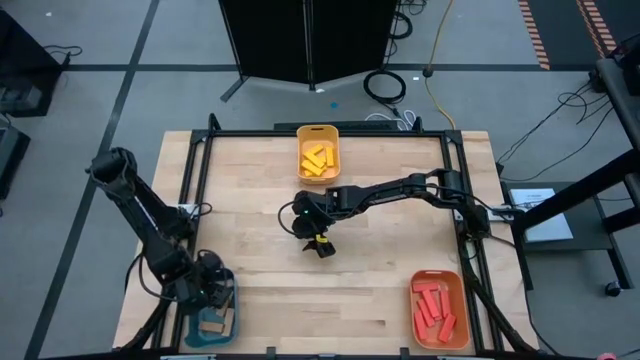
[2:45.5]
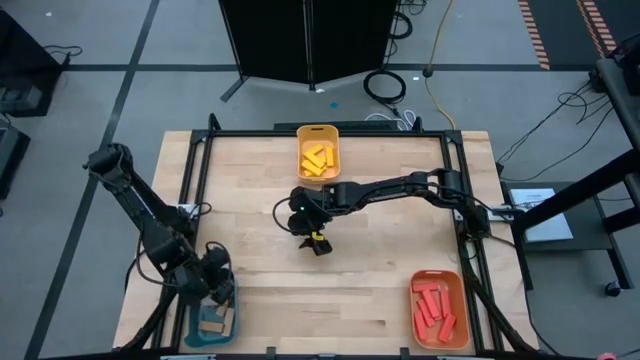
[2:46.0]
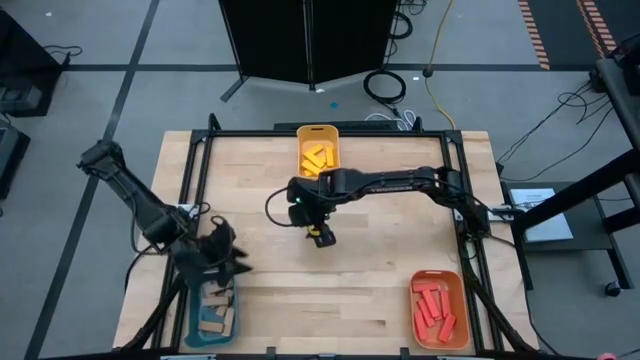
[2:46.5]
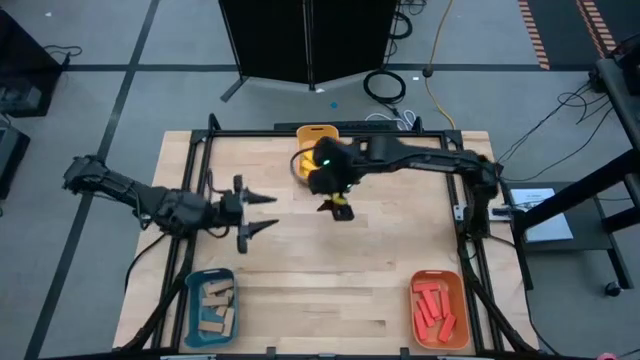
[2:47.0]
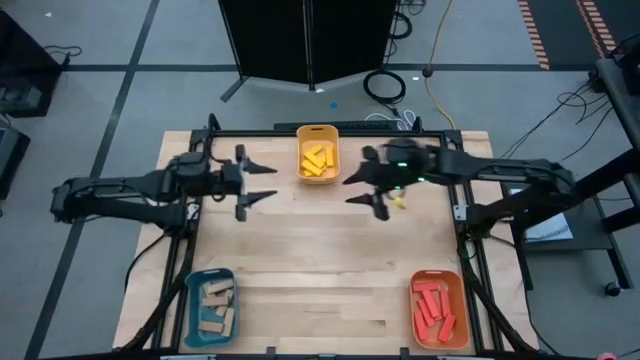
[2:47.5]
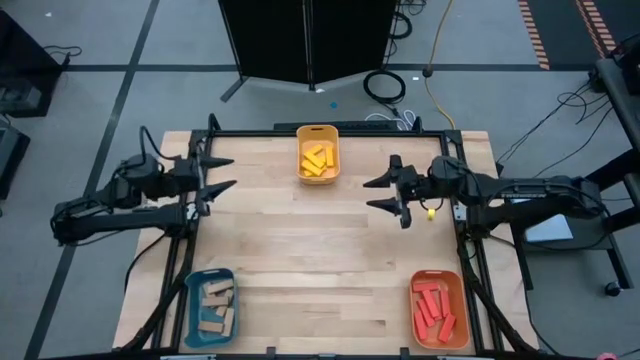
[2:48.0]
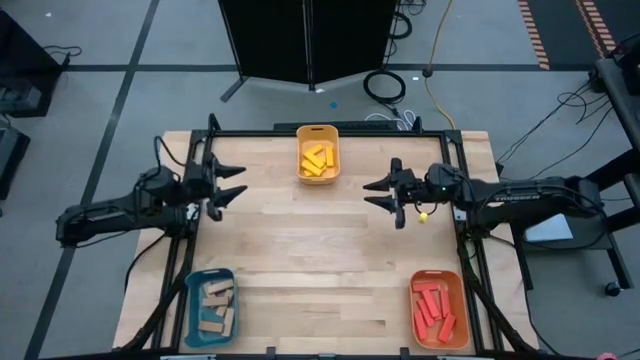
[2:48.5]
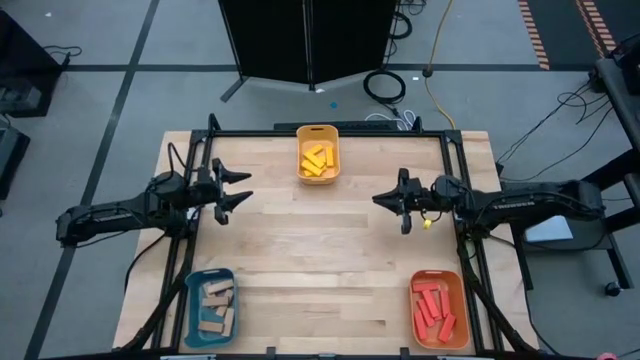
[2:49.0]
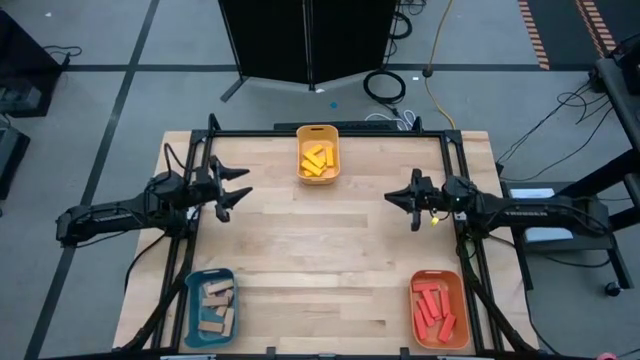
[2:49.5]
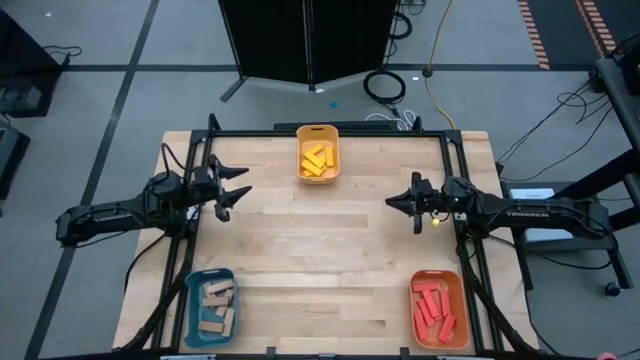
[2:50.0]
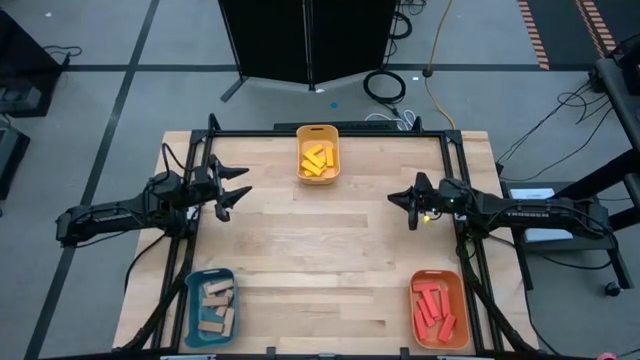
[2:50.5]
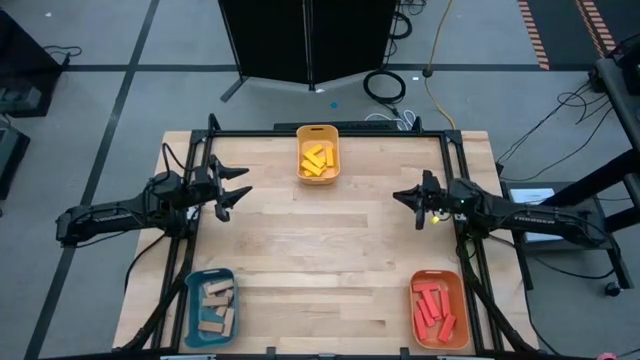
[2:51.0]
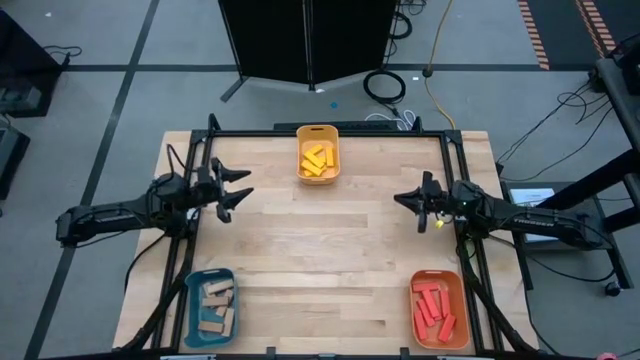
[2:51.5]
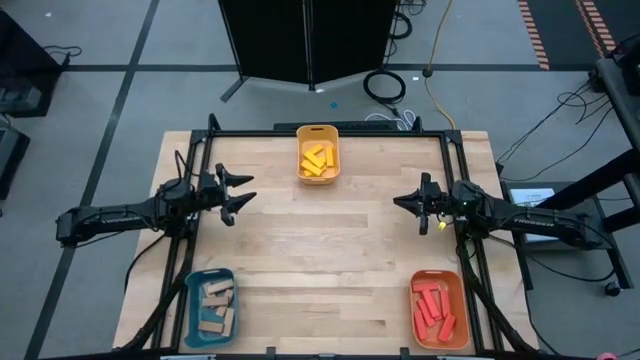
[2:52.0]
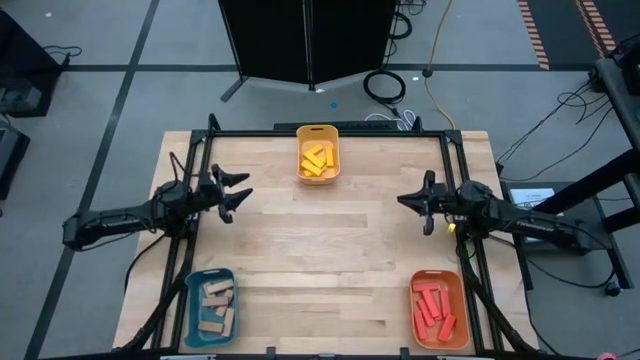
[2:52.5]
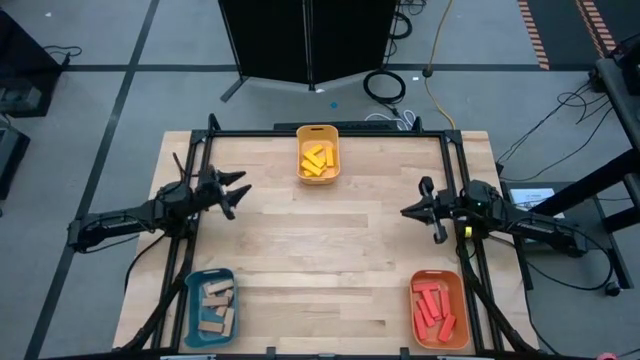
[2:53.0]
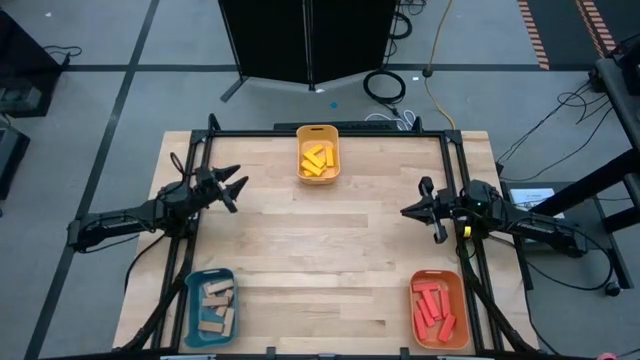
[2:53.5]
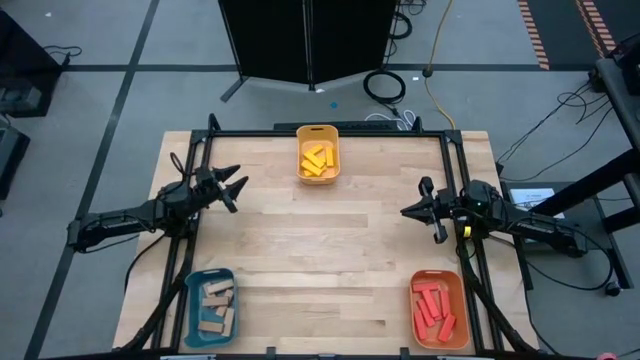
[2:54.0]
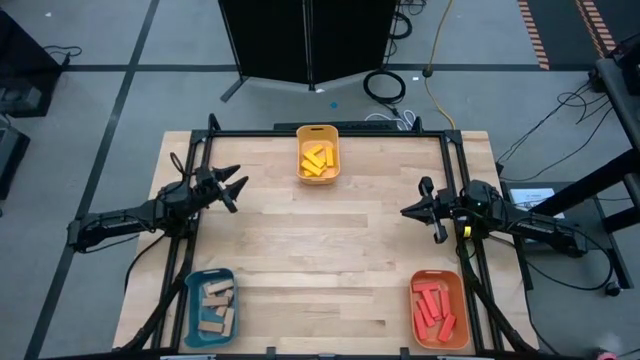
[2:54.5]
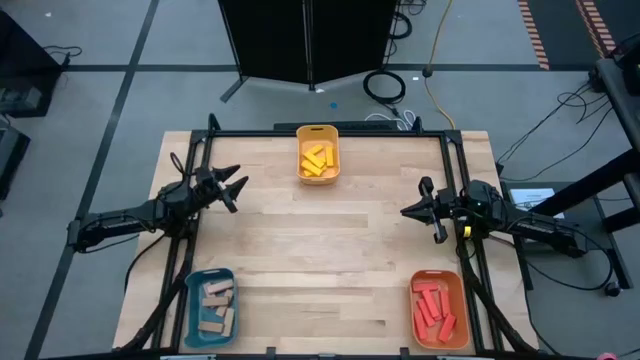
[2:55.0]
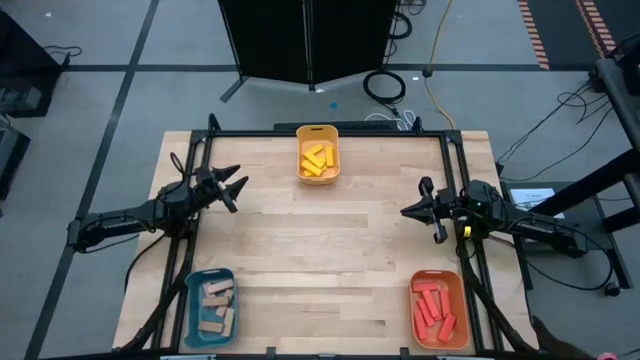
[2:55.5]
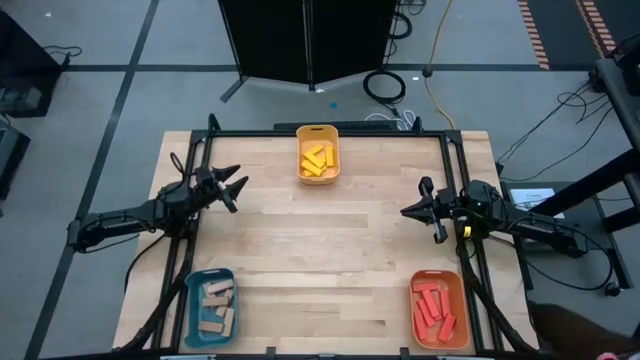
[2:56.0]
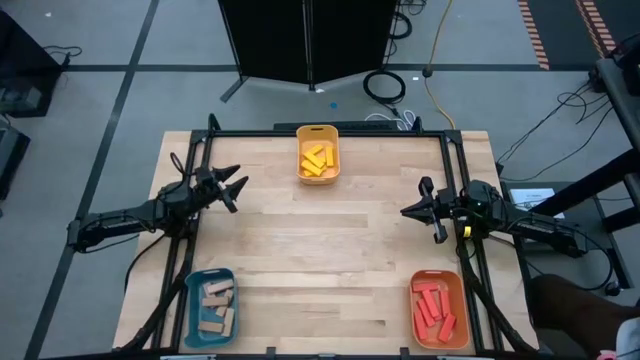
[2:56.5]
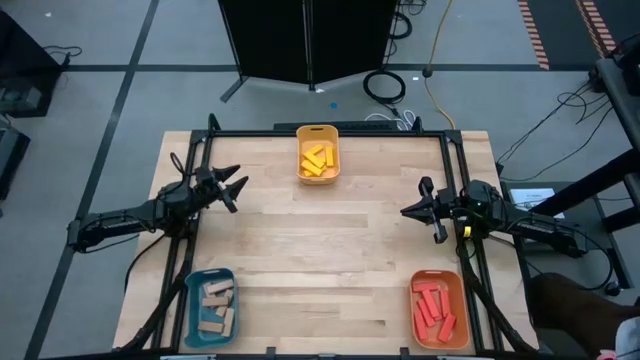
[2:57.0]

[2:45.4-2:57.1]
Task: Sort blocks
Return to Home Position

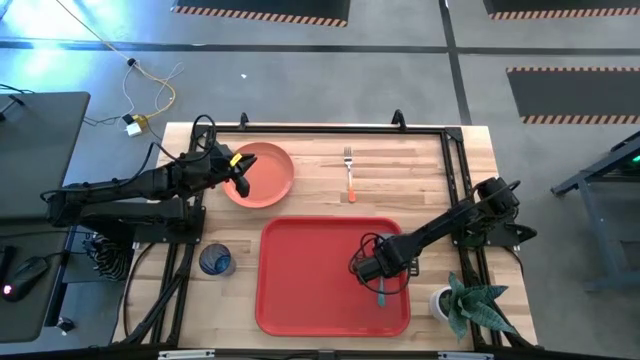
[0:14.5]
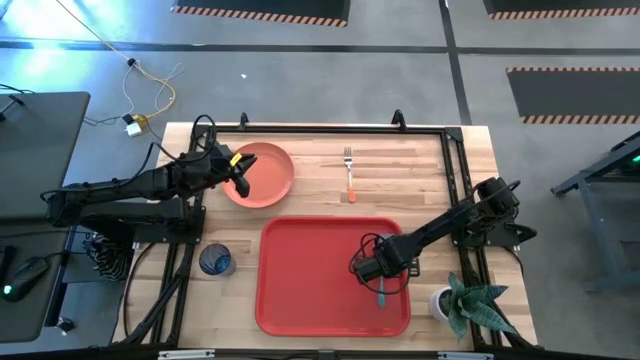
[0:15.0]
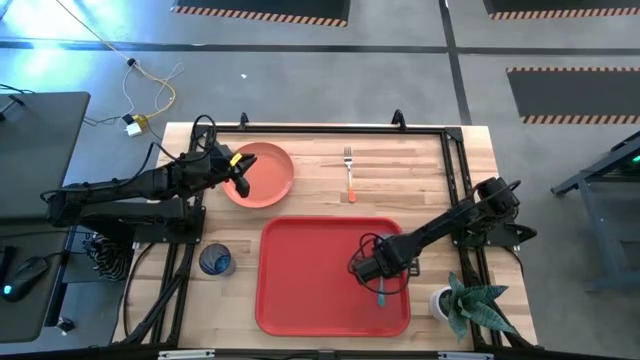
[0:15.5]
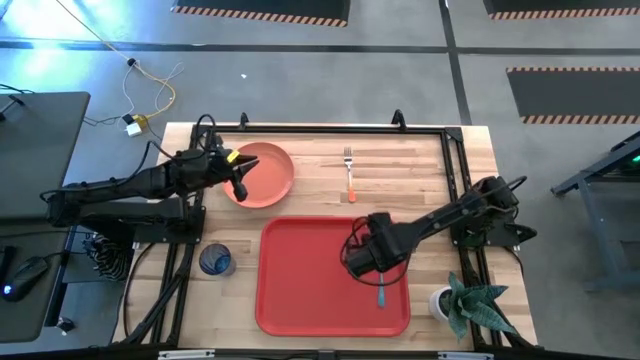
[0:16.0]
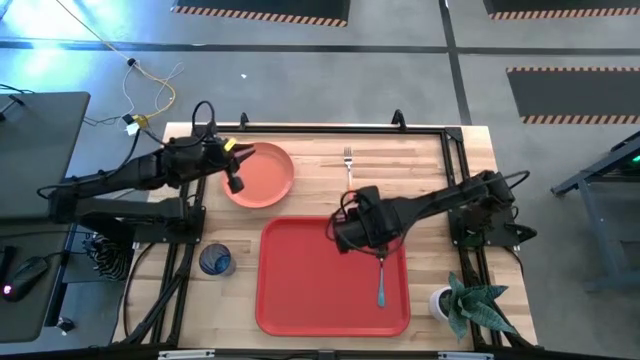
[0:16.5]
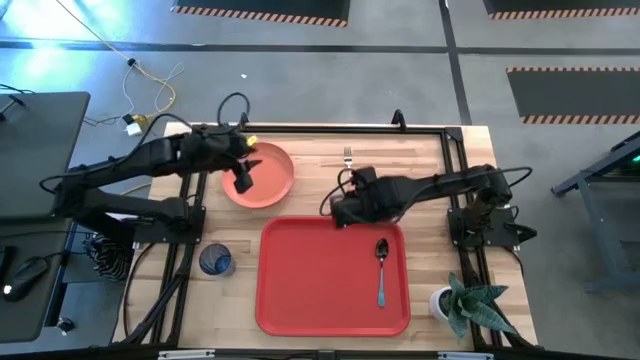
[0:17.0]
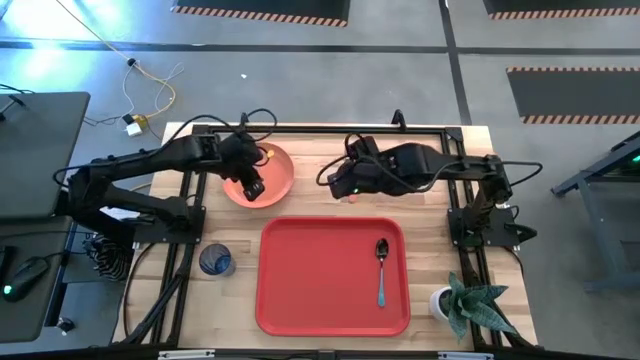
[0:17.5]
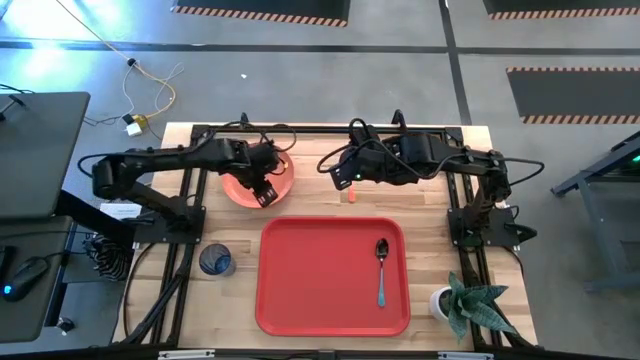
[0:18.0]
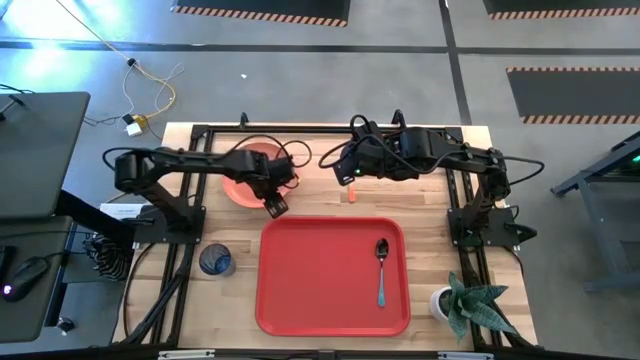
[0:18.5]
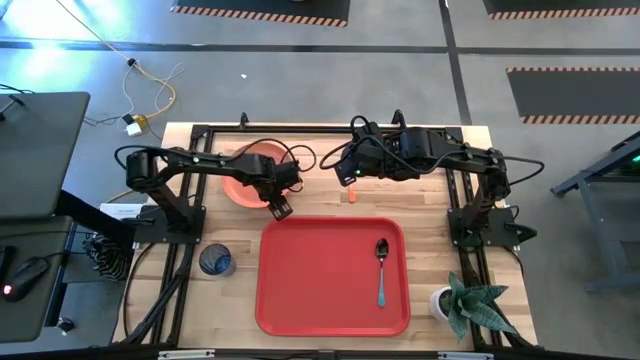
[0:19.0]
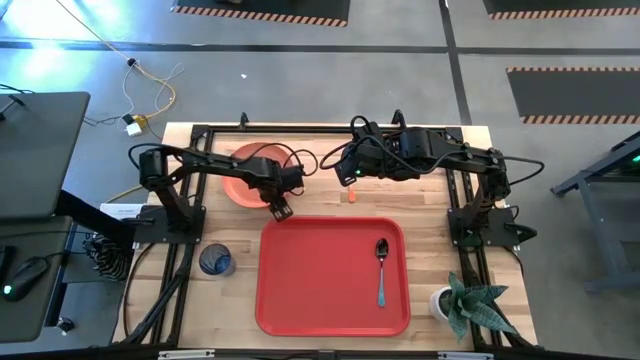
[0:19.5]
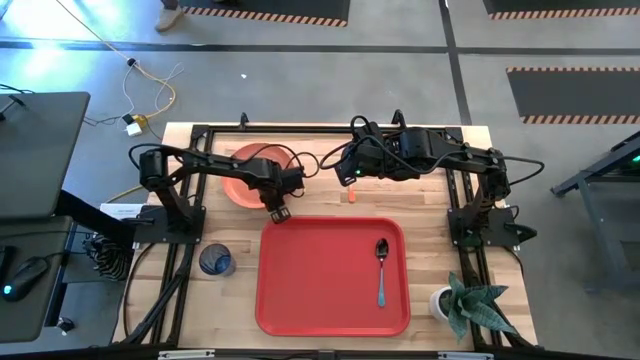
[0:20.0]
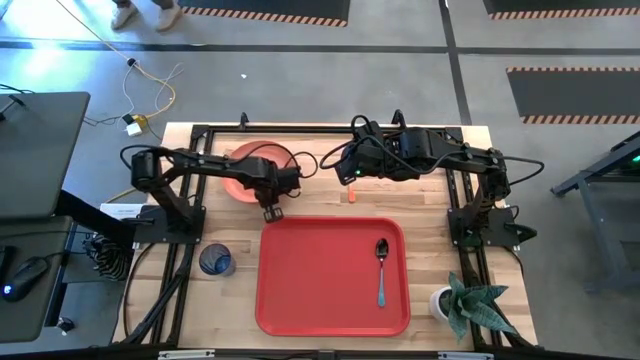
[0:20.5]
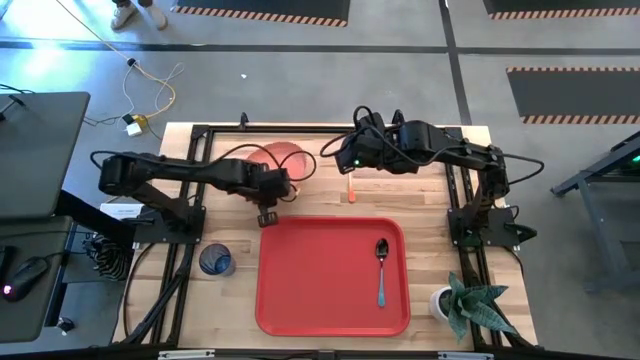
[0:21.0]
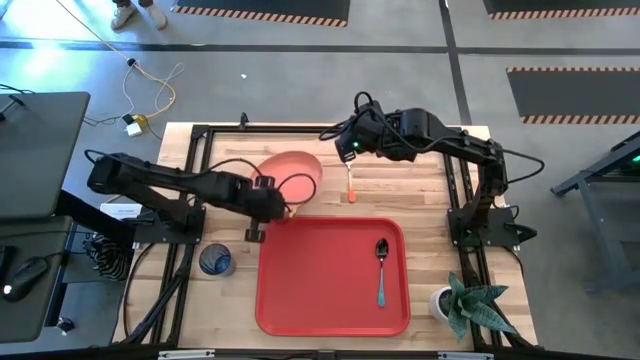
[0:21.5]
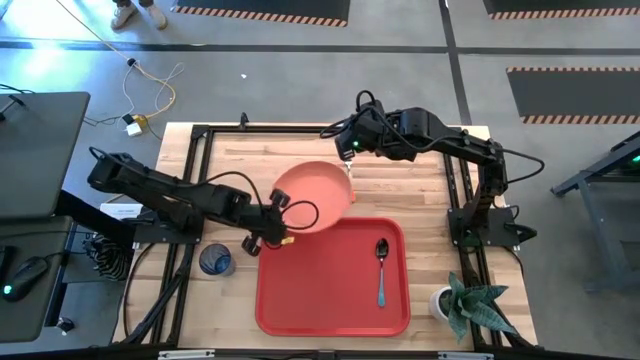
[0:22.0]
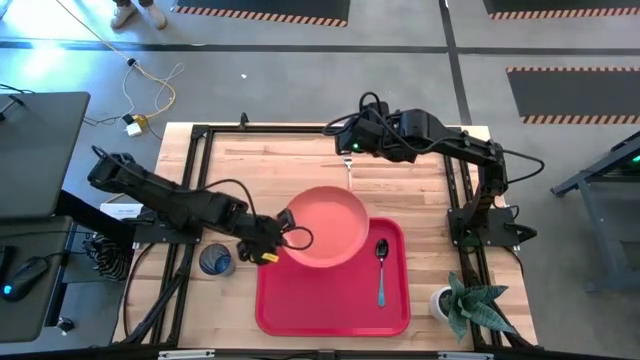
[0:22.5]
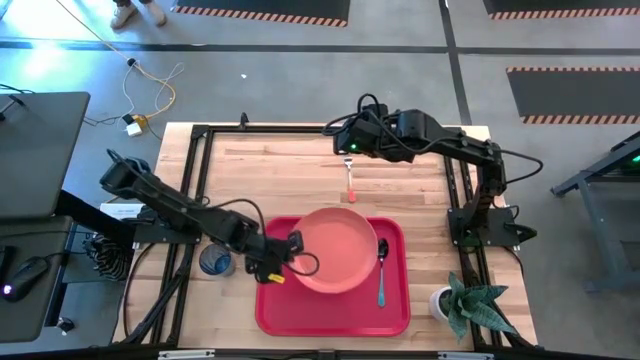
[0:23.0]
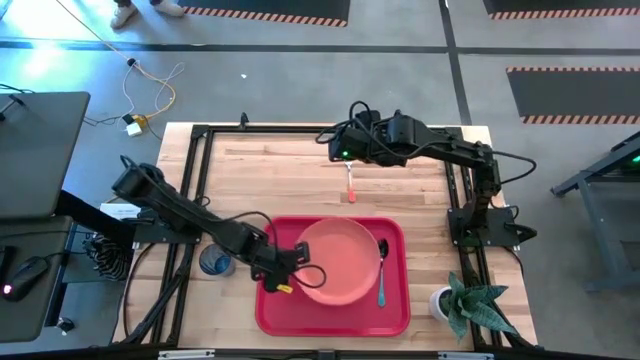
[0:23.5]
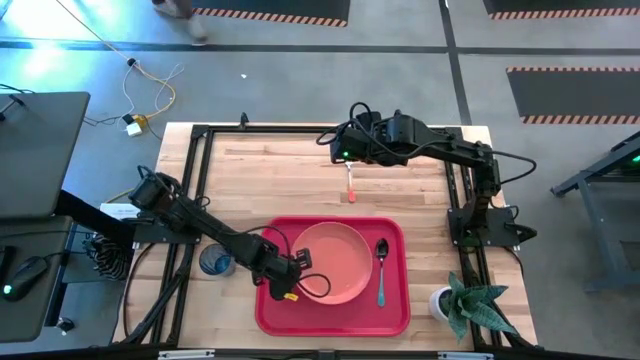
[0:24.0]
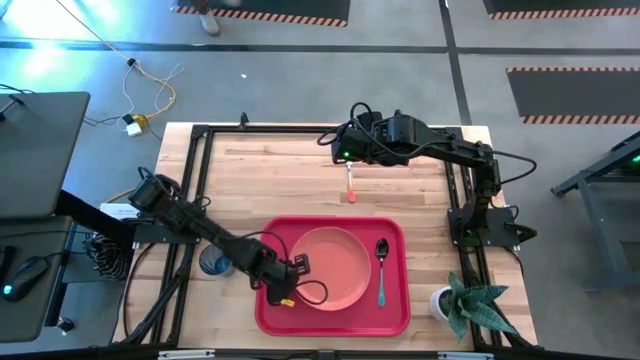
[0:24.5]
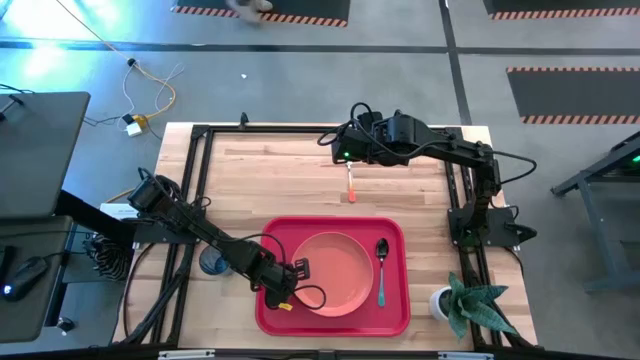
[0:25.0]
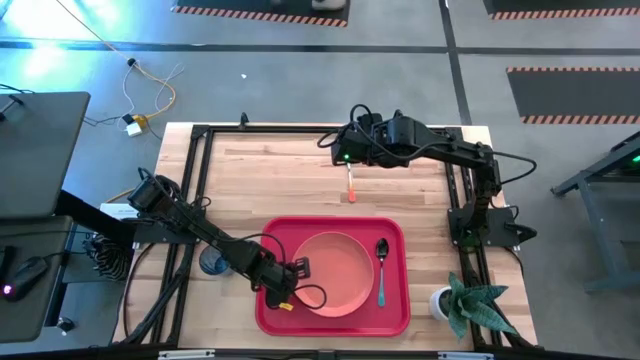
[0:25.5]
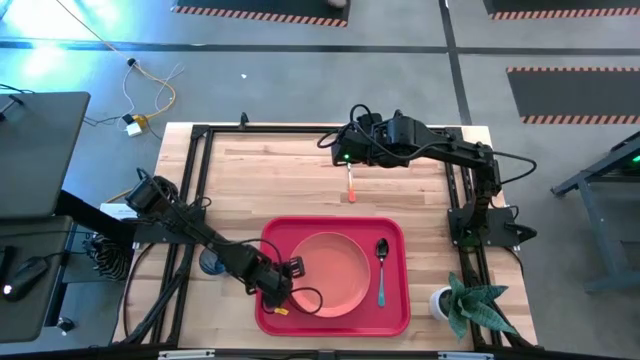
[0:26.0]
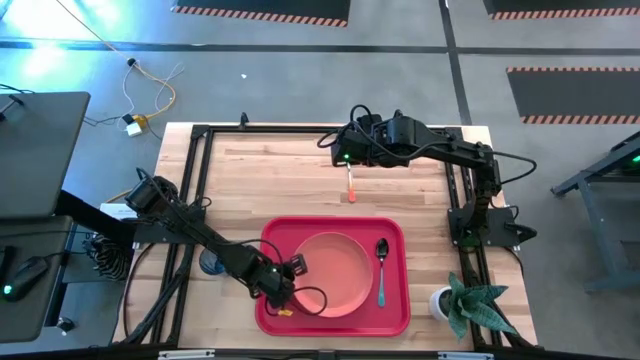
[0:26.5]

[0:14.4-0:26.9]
Task: Pick and place plate/cup/fork/spoon on tray
Put the orange plate on the red tray to the left of the blue spoon
